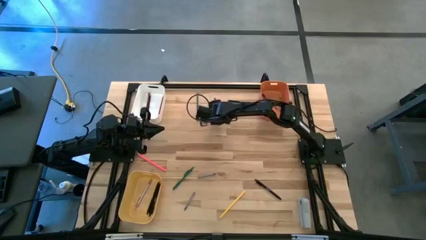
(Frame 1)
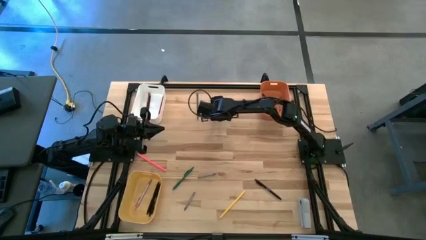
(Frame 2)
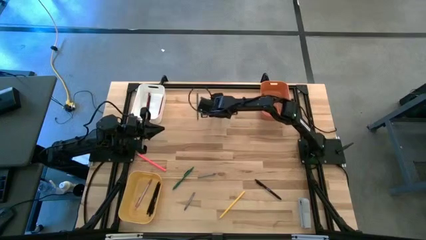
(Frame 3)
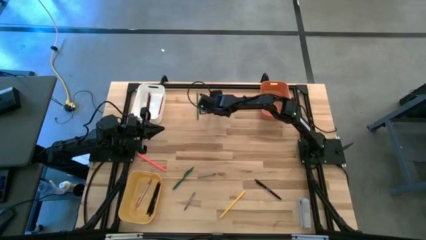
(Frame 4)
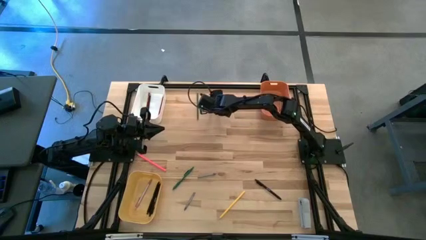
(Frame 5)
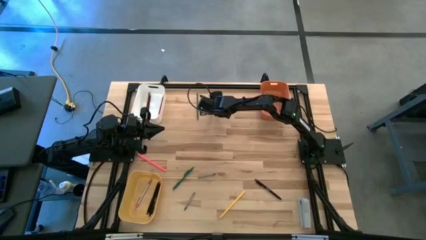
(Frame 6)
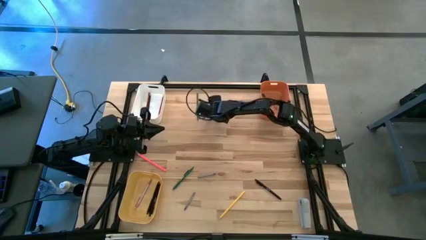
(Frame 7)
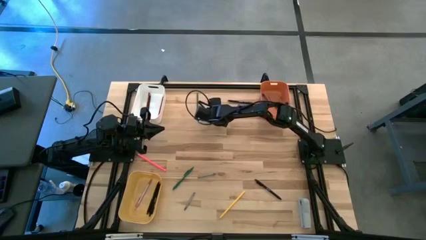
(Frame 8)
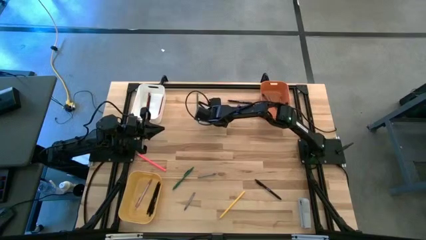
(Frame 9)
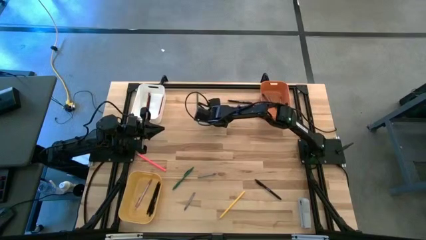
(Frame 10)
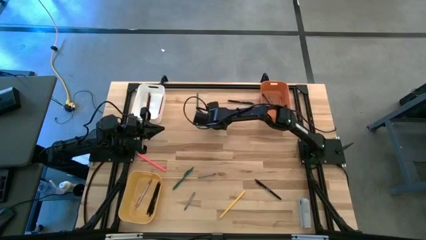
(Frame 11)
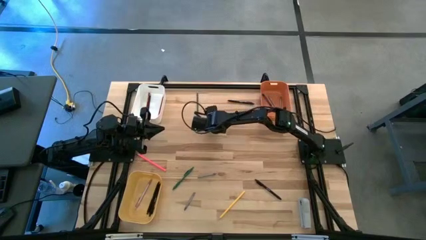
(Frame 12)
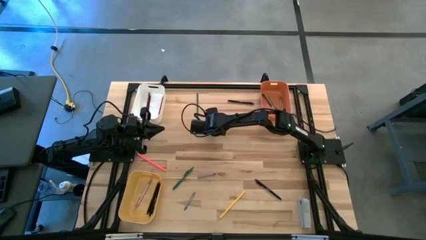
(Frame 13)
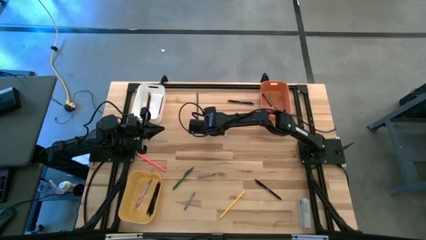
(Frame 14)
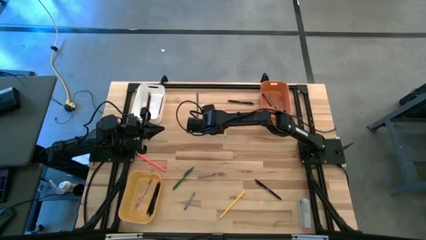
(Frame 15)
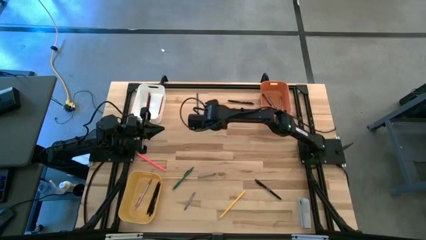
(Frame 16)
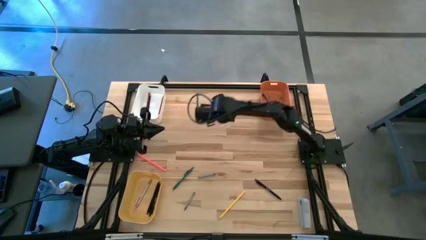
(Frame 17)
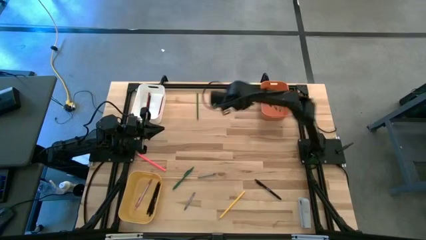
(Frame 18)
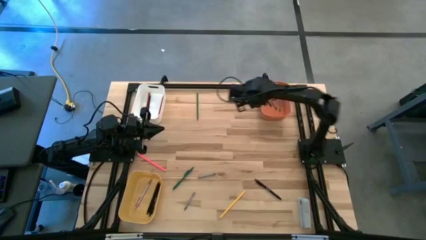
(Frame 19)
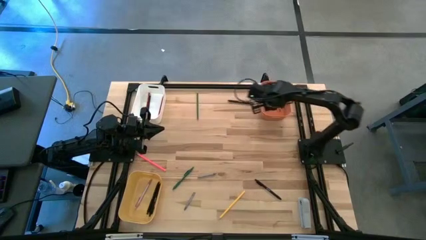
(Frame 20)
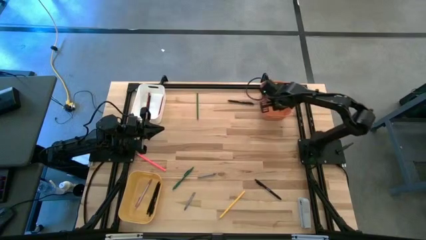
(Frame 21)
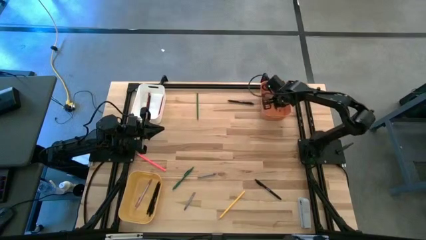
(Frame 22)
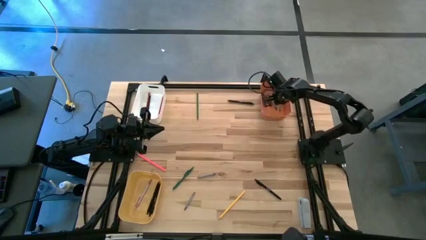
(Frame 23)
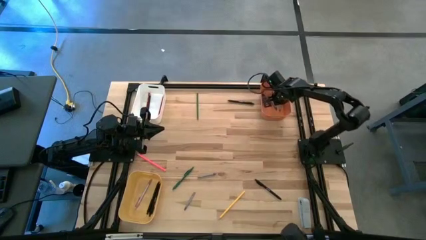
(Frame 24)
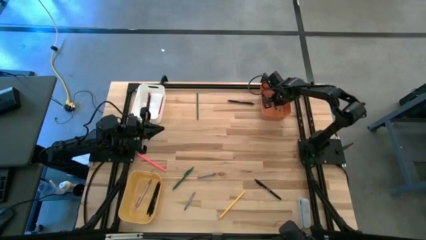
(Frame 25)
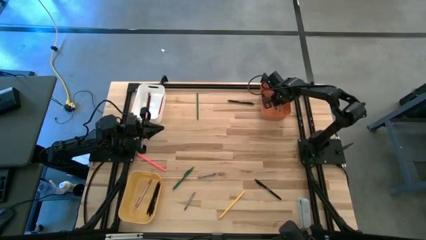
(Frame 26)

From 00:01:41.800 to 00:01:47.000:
Task: Sort crayons/erasers/pens/pencils in bins
Put the blue crayon into the orange bin

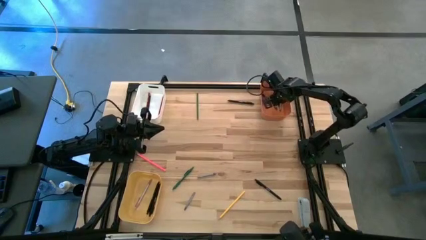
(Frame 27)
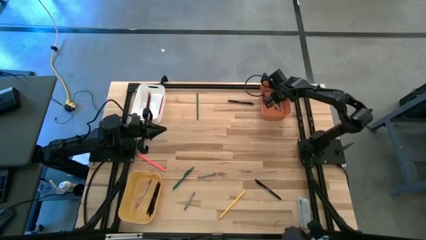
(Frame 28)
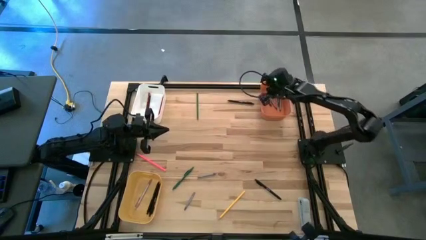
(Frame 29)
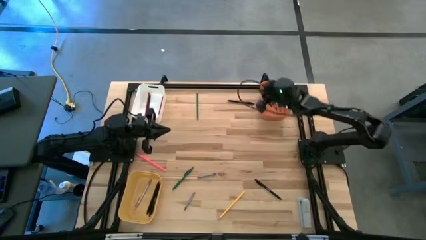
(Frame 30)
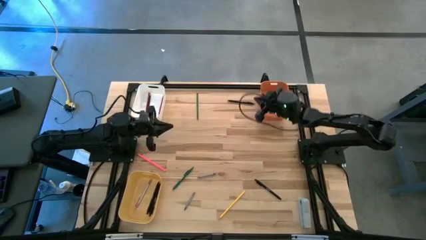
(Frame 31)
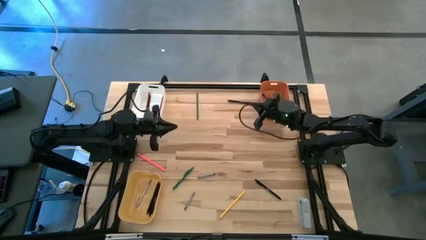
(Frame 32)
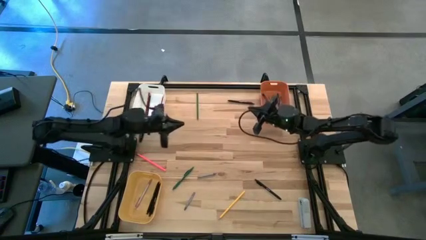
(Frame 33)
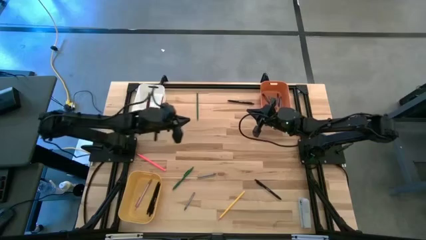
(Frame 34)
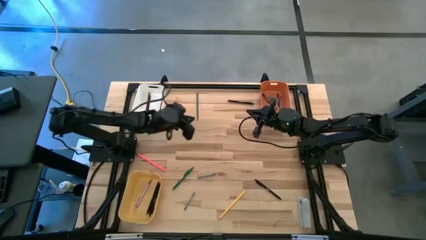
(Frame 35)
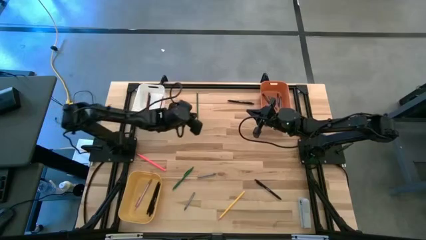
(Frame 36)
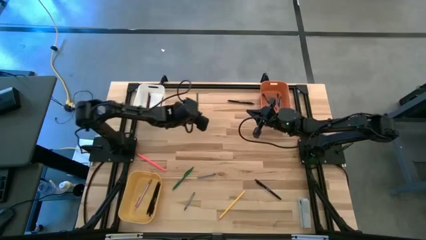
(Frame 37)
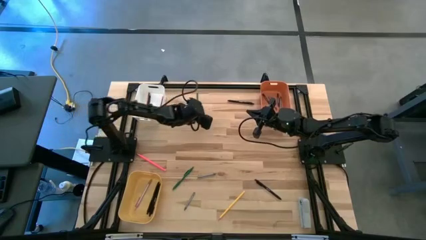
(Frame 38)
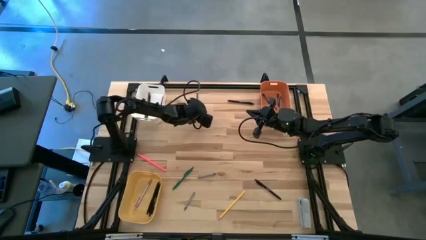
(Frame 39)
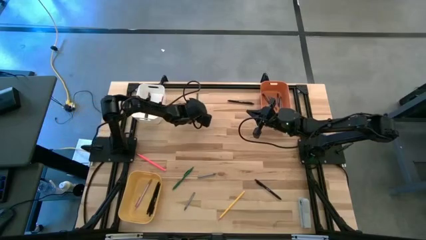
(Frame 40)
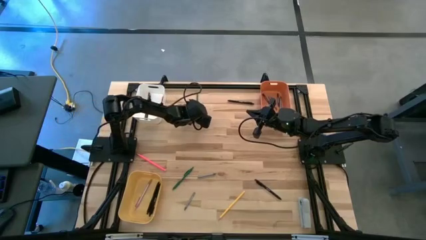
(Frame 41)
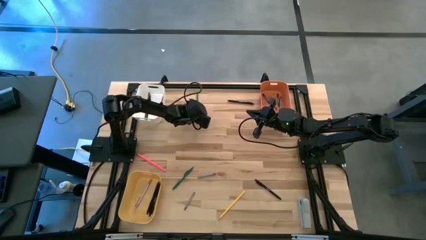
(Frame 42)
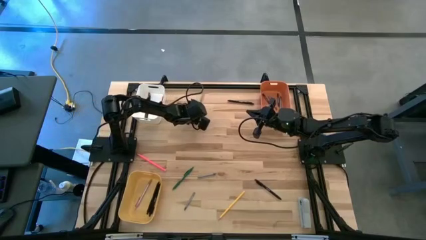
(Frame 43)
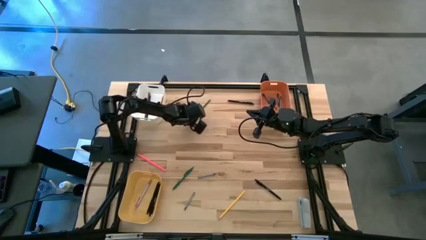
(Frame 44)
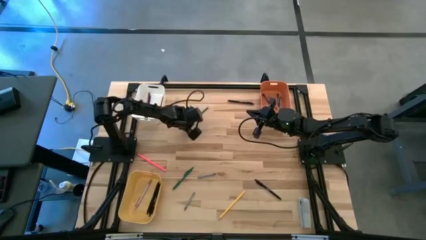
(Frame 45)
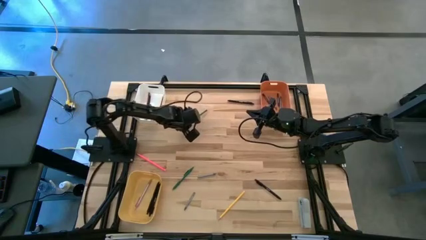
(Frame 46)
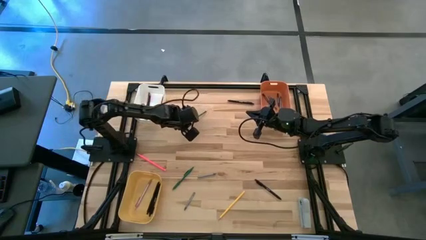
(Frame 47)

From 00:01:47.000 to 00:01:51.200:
Put the green pencil into the white bin

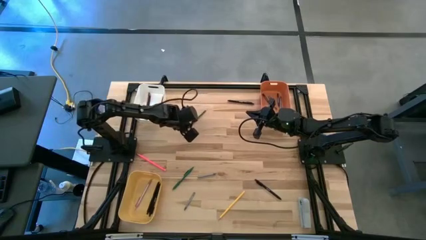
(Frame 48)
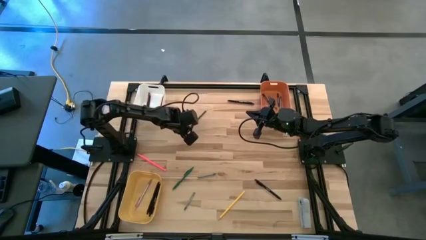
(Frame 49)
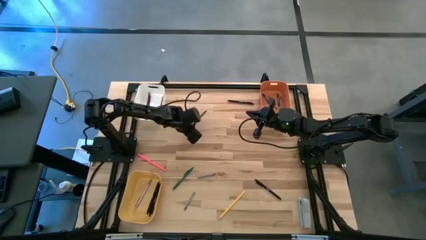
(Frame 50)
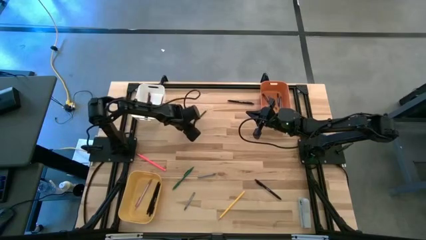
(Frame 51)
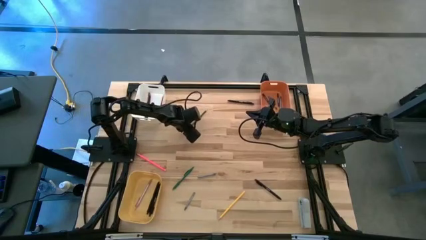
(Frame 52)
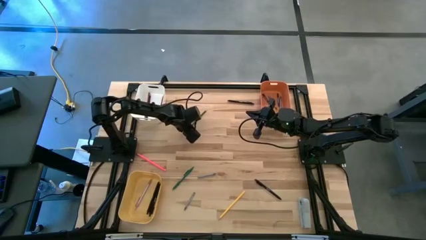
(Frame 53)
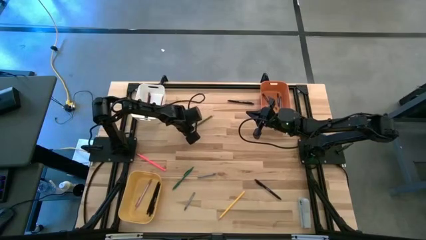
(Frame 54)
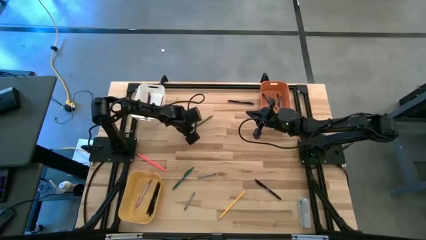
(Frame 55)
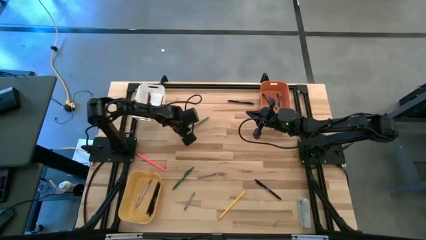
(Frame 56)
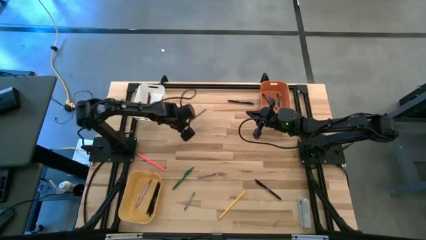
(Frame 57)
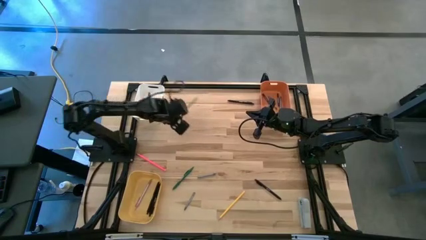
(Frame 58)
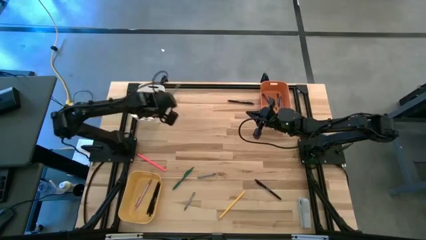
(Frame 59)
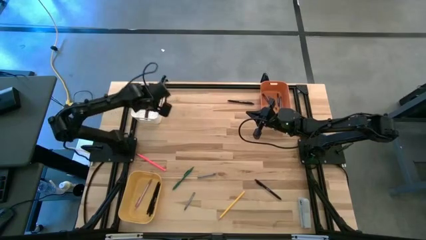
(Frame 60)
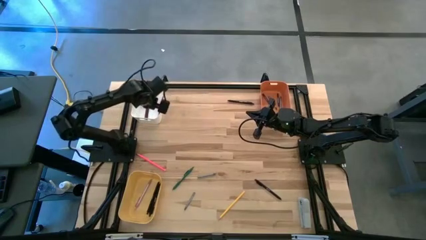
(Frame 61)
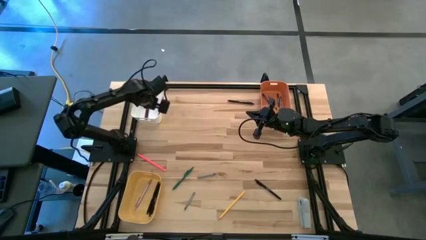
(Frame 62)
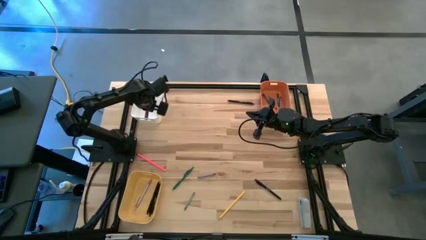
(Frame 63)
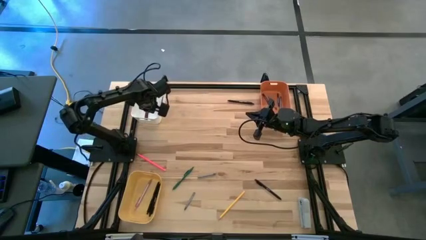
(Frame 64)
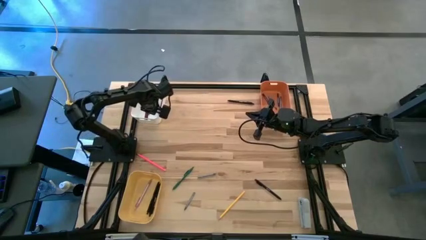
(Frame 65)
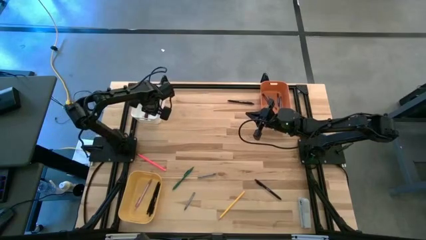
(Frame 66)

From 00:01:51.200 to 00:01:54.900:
Put the green pencil into the white bin

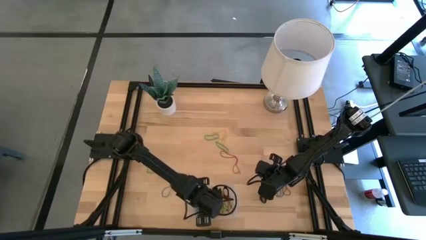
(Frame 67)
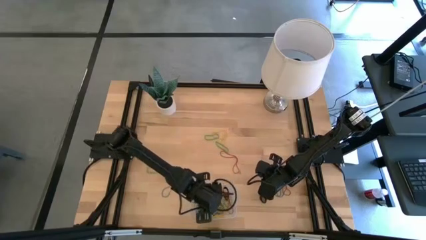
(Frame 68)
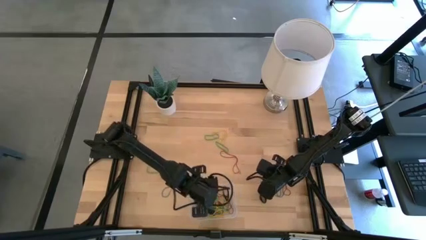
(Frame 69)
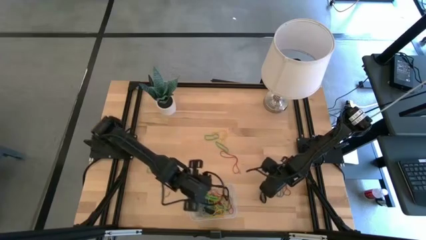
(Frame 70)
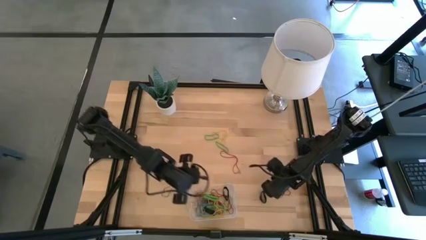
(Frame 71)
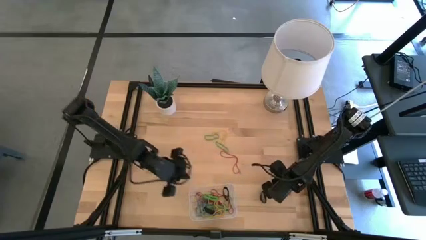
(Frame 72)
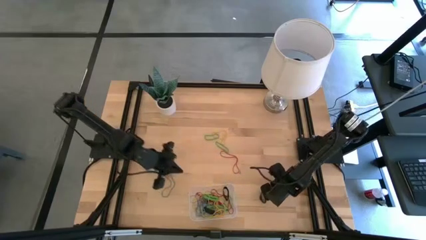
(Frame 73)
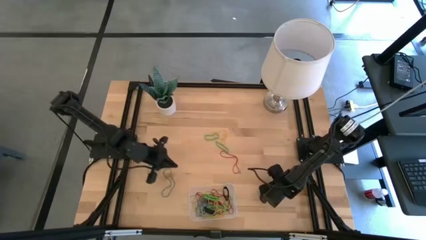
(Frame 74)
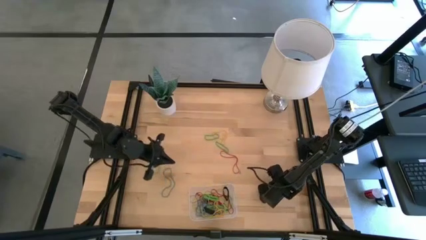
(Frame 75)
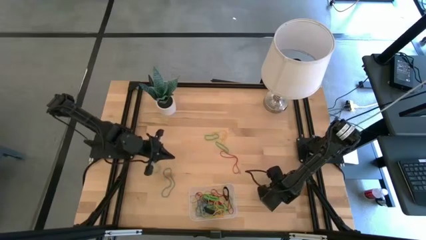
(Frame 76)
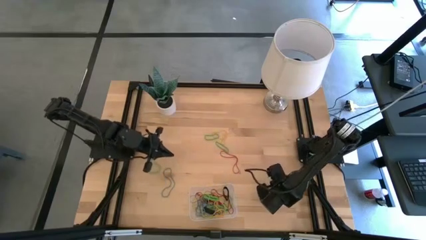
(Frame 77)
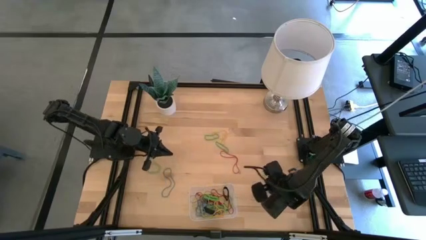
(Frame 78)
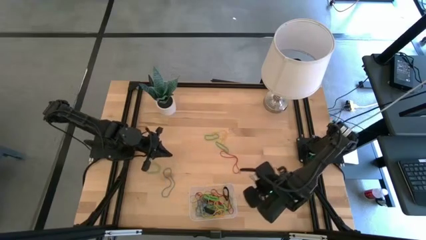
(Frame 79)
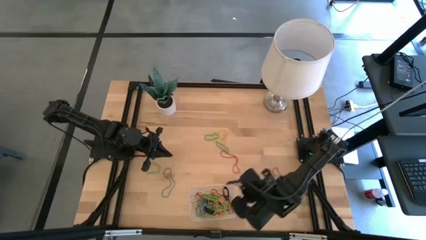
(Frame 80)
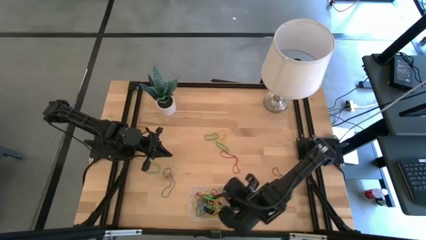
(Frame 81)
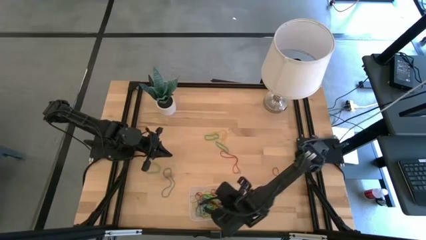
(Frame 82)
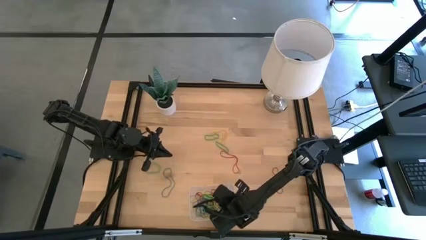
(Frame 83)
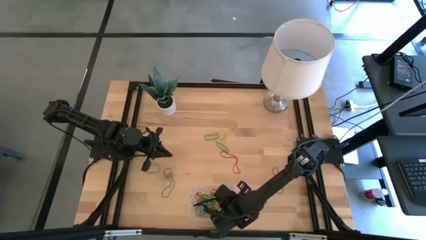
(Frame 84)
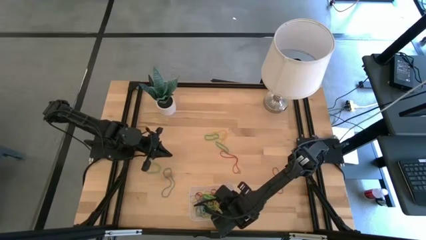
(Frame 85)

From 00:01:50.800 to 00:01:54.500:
Task: Pick and place rubber bands into bin
Put the blue rubber band into the transparent bin
